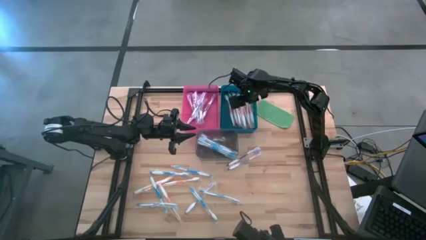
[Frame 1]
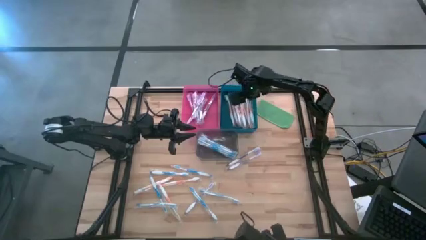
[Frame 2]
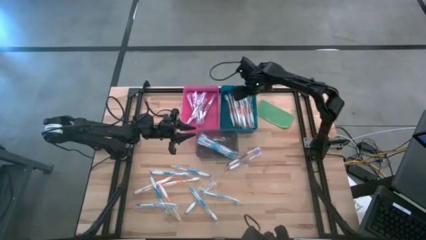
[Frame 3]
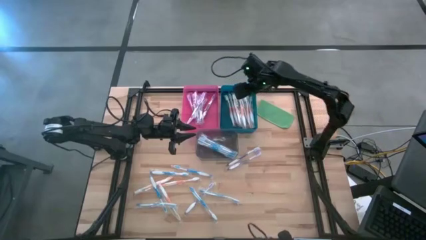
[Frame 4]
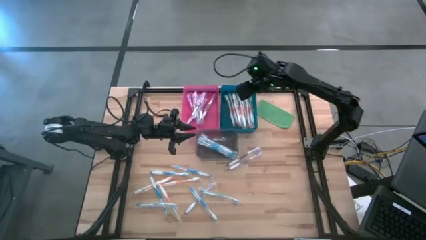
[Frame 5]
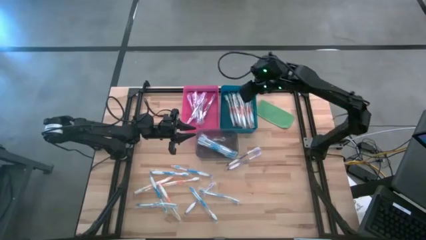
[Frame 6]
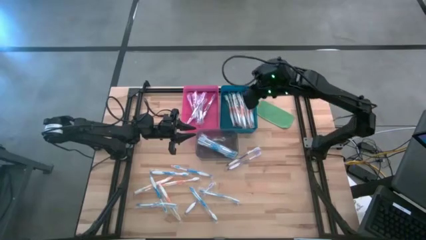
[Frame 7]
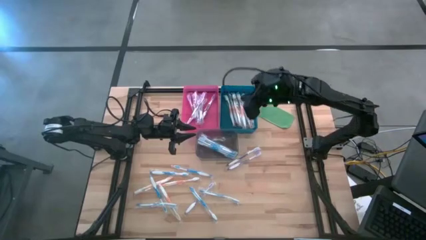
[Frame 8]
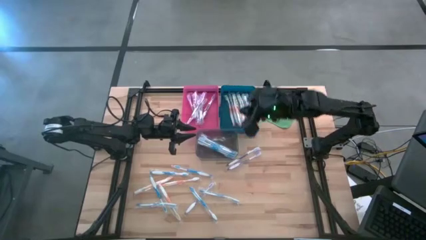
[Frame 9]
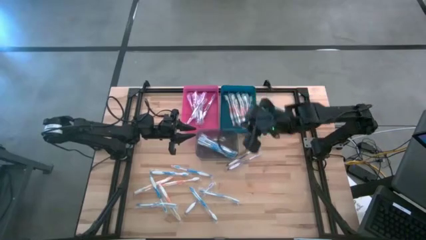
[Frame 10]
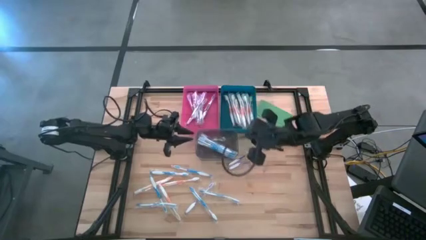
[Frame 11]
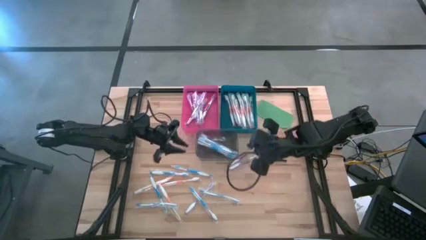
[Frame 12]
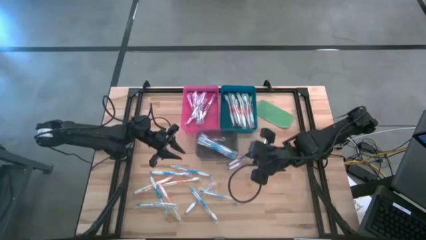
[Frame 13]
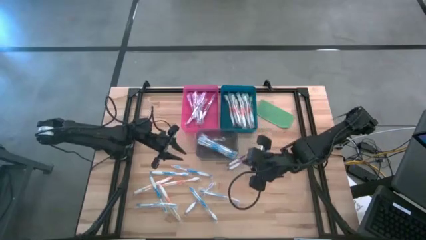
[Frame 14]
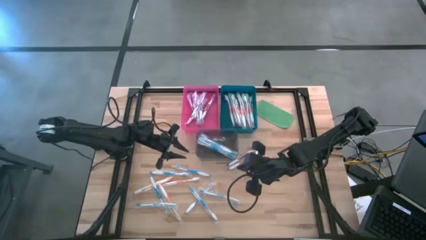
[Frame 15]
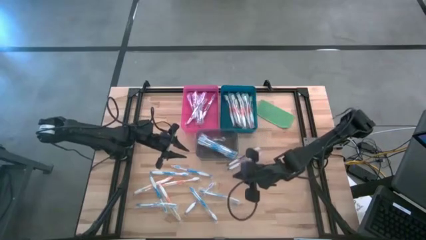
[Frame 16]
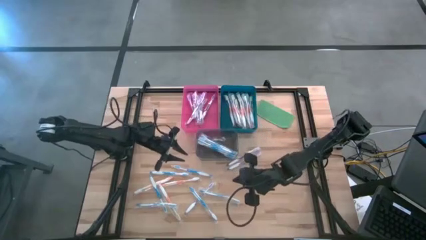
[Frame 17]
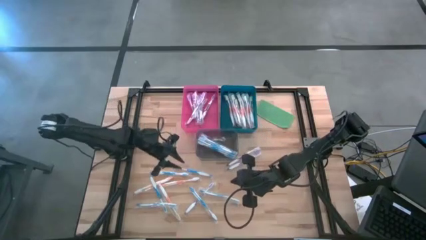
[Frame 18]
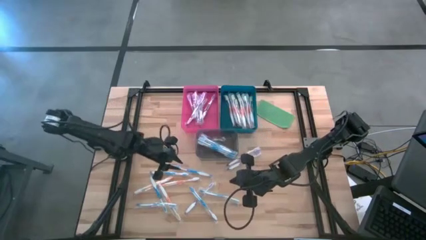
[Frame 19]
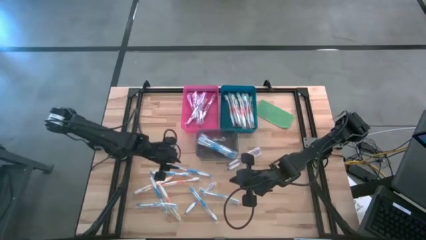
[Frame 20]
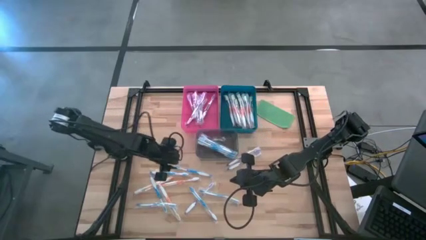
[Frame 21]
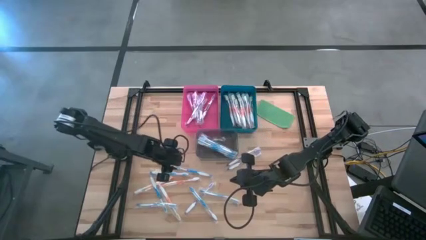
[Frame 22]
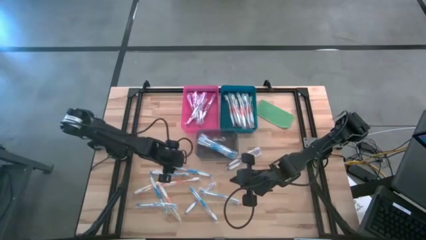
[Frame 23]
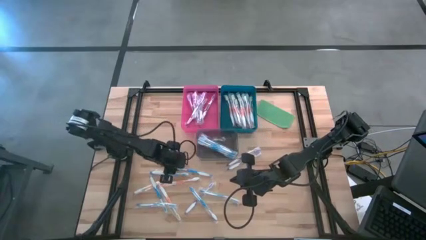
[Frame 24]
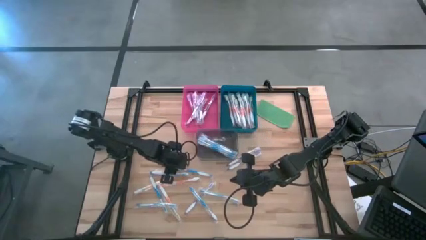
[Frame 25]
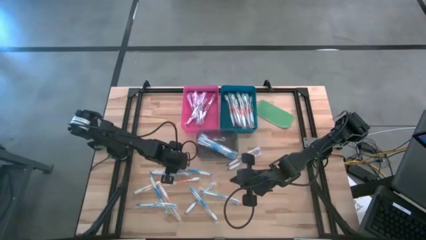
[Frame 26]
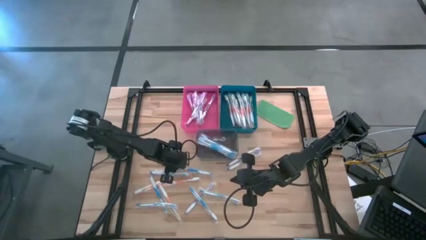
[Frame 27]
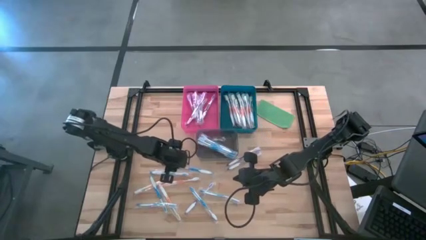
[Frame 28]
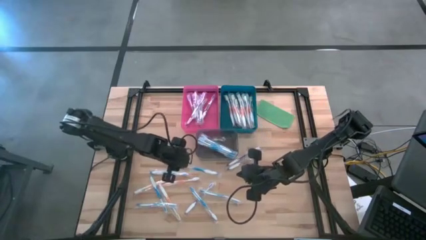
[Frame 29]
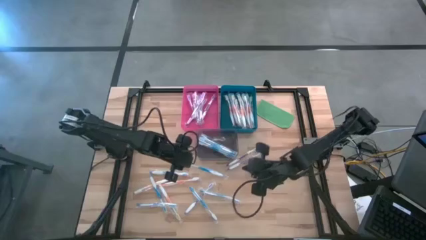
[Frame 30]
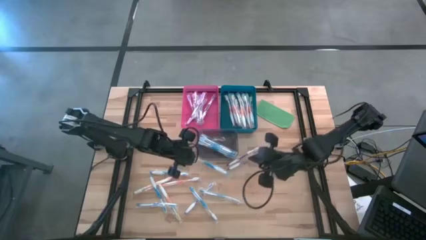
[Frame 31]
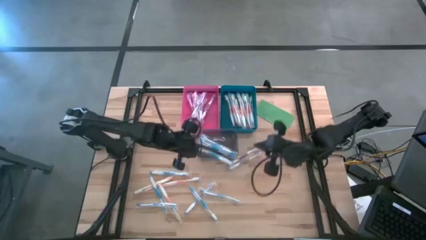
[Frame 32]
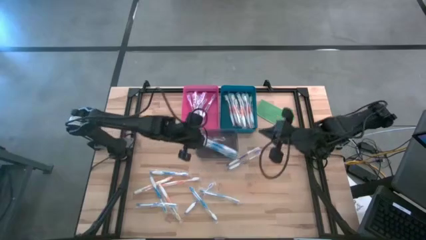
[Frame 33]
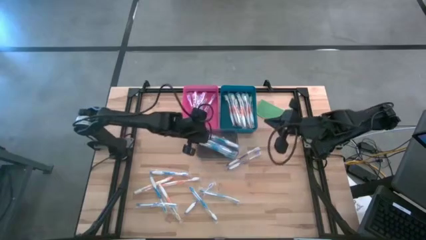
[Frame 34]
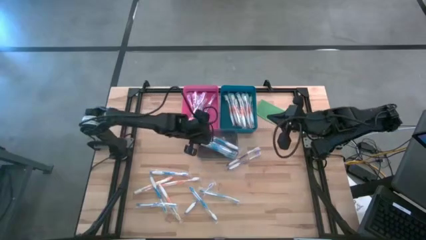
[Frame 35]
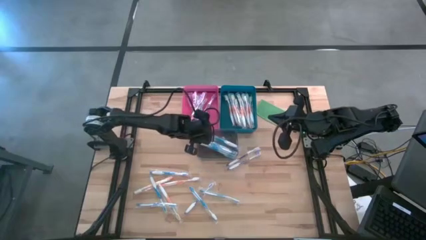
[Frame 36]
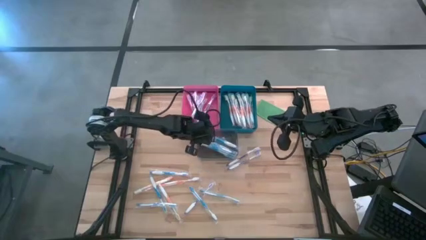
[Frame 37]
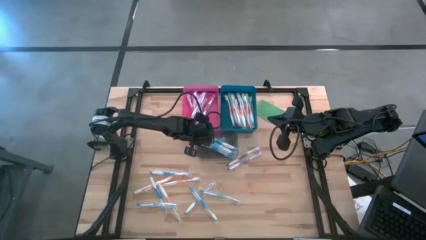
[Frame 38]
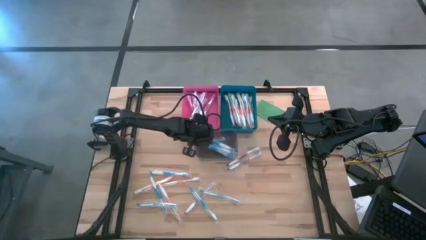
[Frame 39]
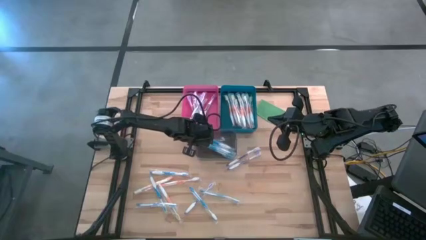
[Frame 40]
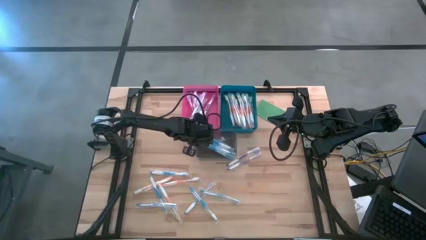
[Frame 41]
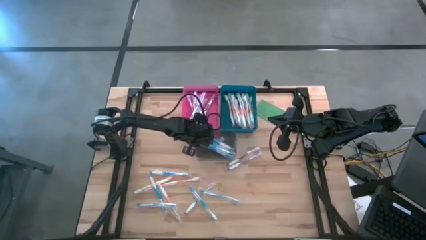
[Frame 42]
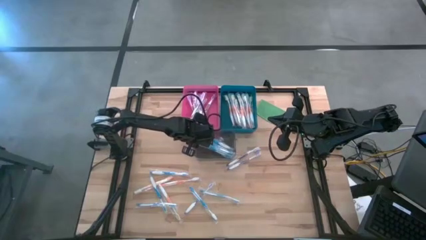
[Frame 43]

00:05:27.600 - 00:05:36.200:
Task: Pick & Place Toothbrushes
Put the blue toothbrush into the transparent gray bin

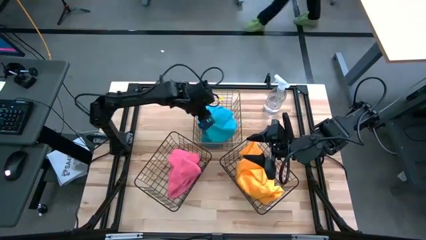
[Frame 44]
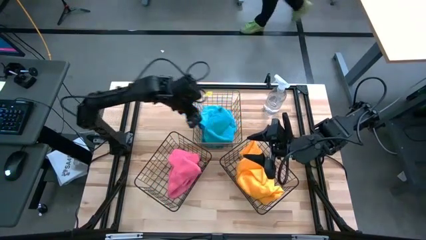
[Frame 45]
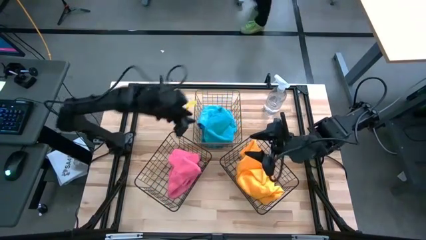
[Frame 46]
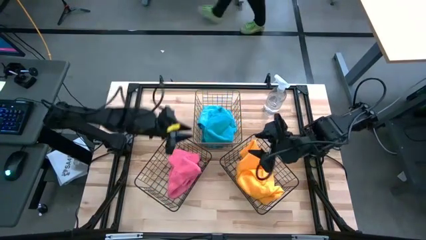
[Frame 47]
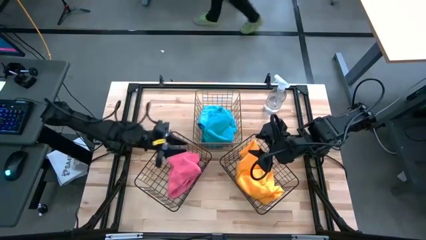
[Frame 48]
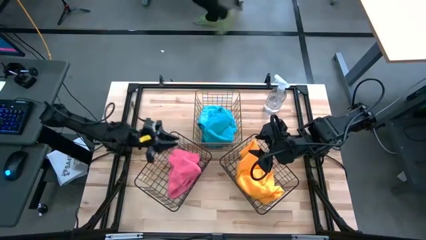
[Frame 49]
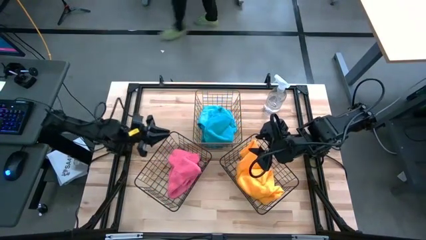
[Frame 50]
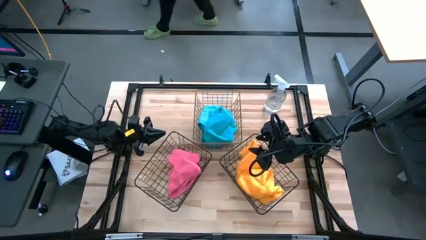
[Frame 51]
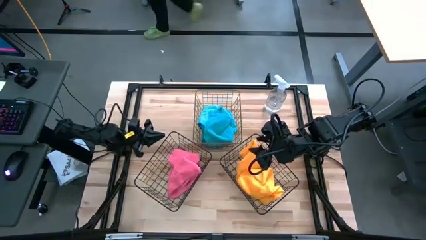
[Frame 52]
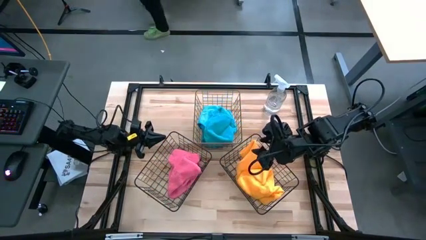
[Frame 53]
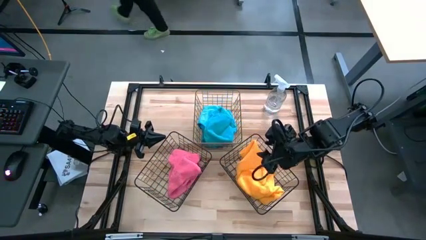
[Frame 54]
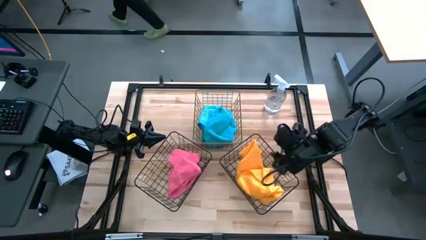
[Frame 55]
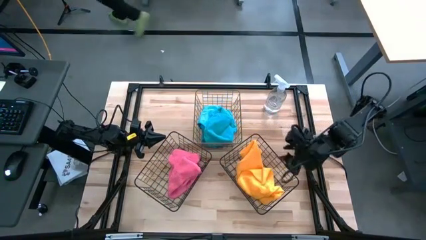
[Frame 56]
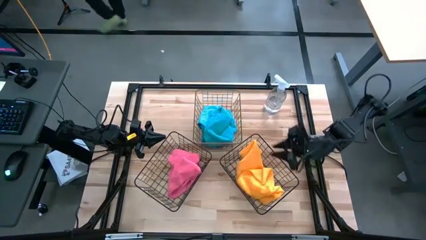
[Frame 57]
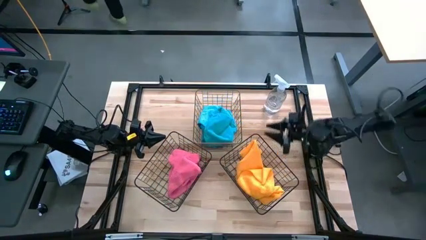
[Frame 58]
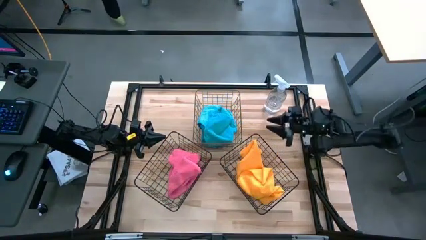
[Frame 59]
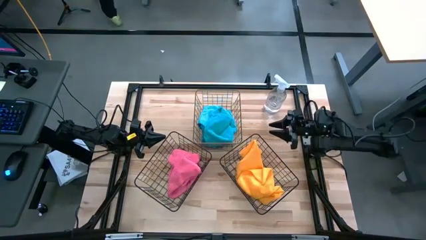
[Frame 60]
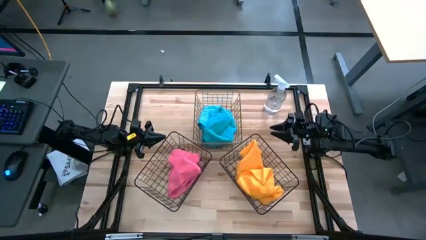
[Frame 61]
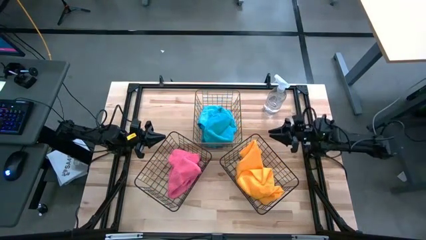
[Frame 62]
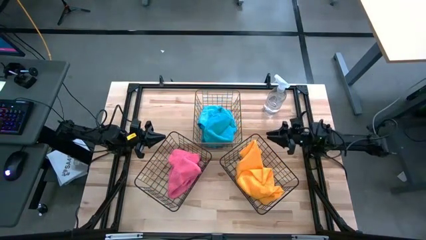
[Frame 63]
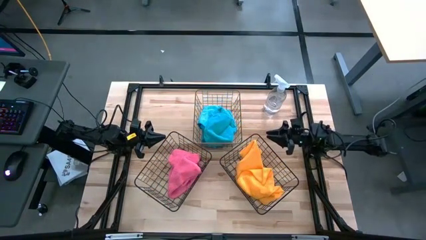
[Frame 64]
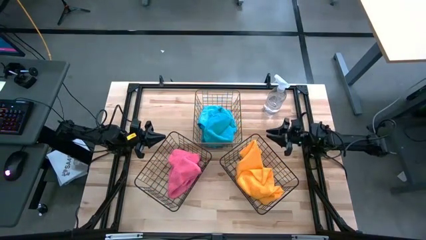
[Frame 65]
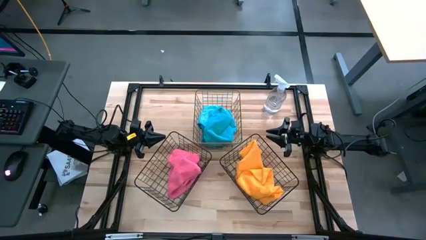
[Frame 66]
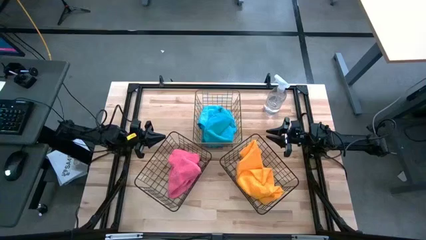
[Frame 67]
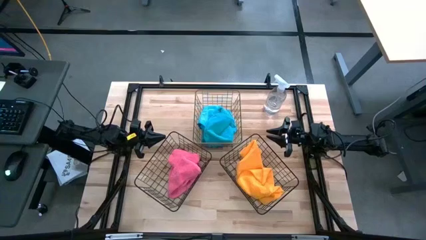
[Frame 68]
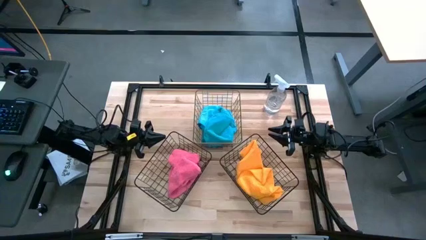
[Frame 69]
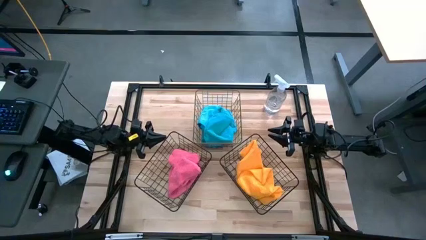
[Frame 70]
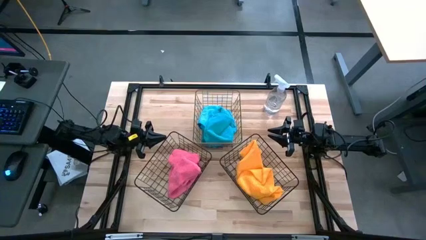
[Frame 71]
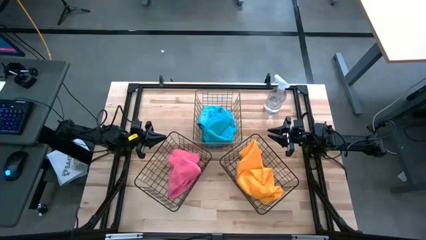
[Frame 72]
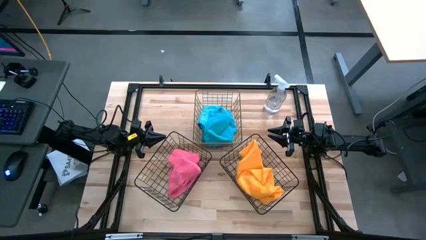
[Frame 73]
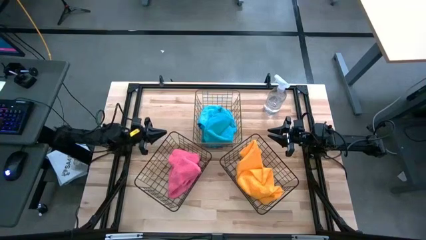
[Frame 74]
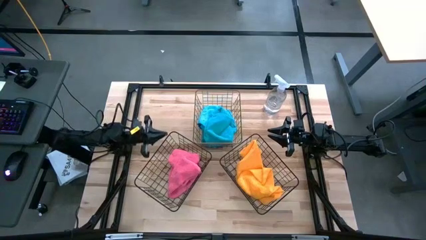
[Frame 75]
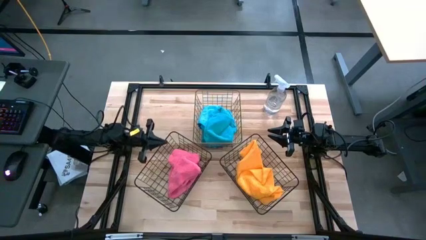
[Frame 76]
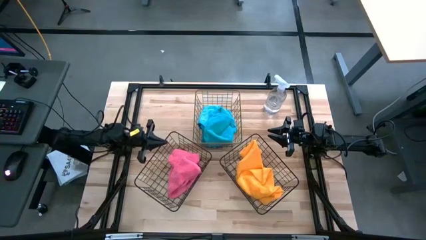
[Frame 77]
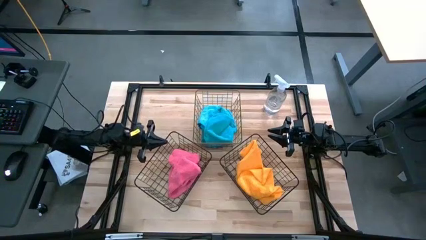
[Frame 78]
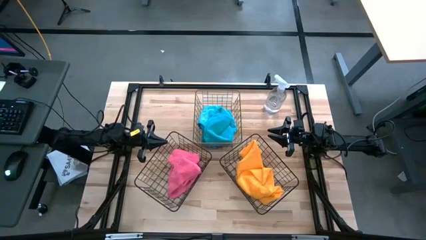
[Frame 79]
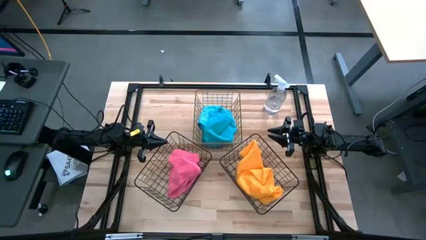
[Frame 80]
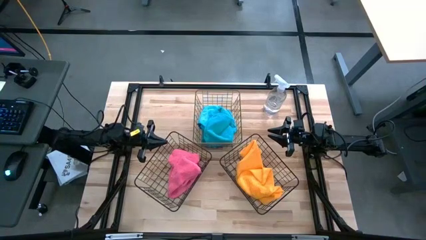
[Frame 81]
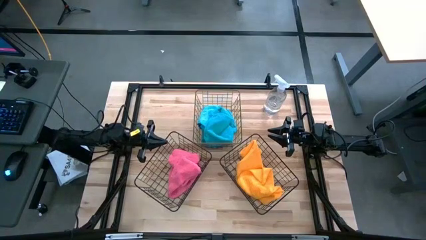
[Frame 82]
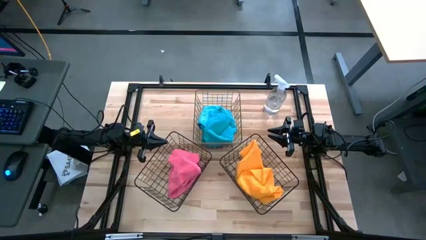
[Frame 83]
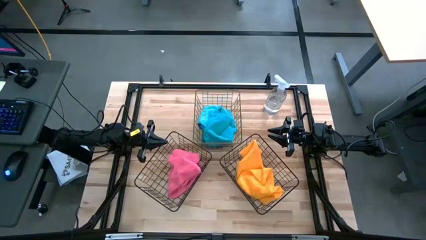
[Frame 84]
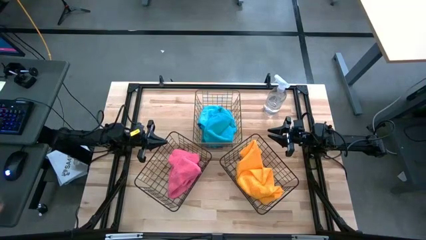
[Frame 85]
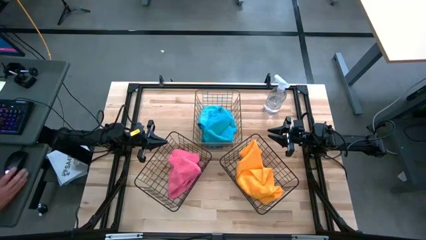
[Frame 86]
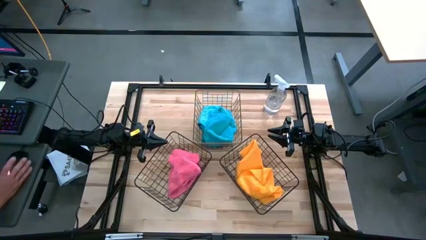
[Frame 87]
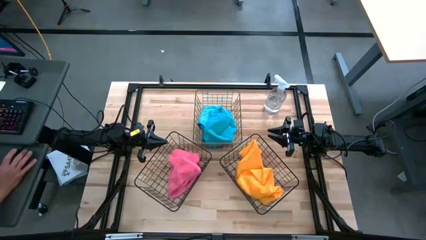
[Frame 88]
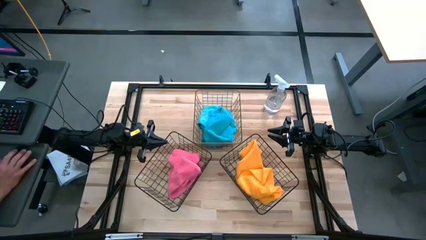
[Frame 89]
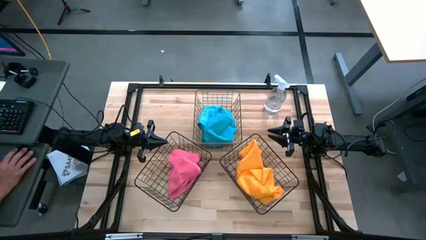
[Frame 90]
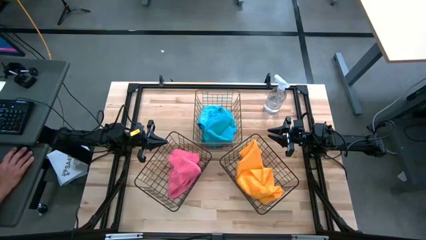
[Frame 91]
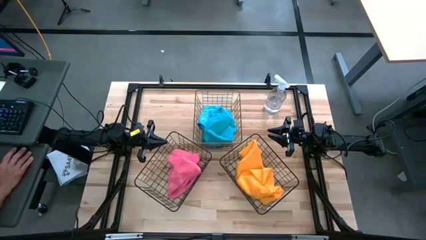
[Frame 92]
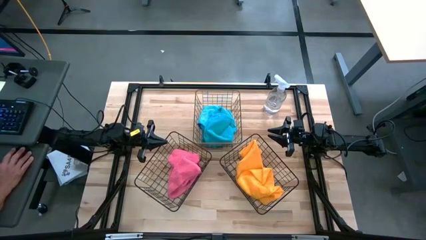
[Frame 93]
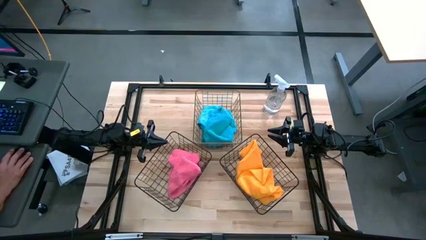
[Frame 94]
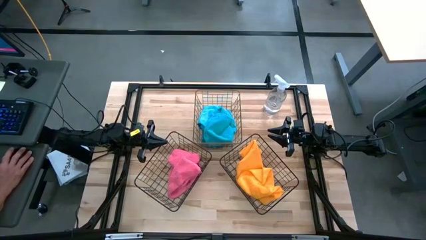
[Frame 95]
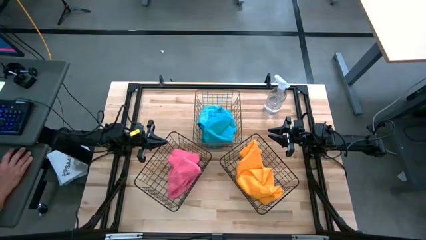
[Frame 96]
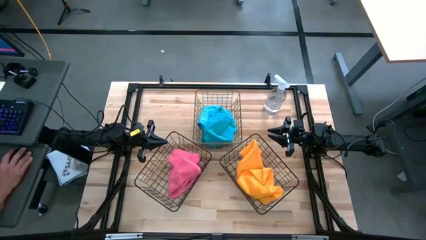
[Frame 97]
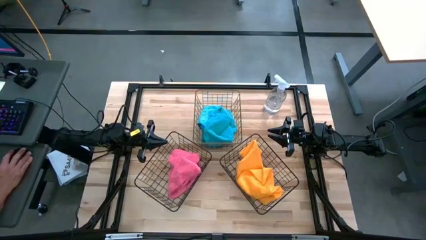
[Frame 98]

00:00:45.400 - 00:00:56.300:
Task: Sort microfiber towel by color & place in baskets
Return to Home Position
